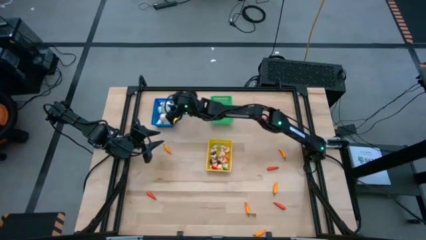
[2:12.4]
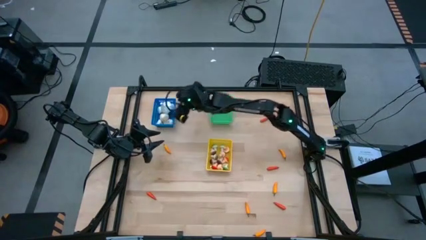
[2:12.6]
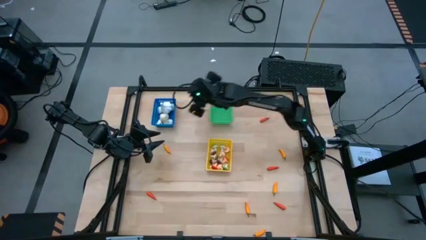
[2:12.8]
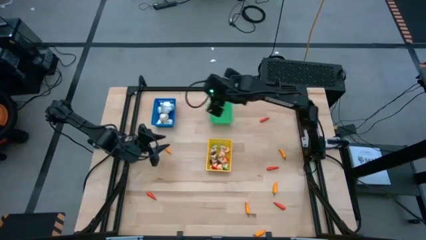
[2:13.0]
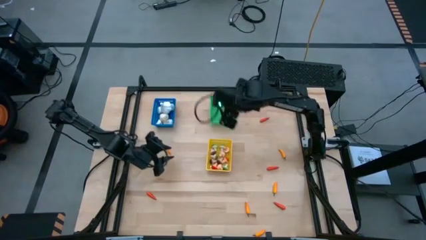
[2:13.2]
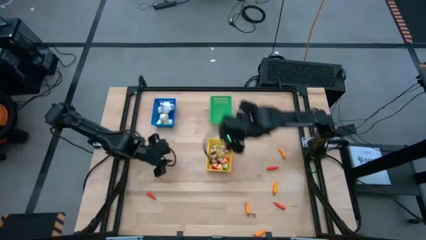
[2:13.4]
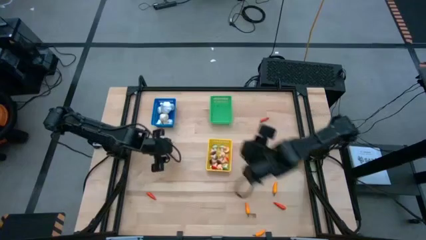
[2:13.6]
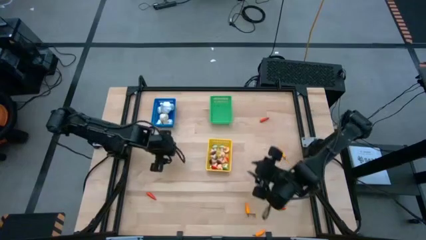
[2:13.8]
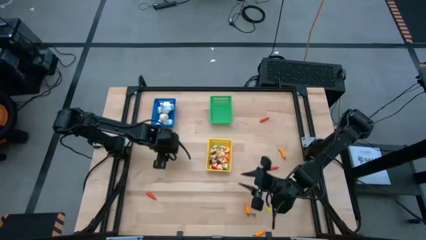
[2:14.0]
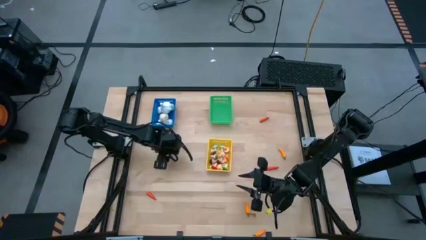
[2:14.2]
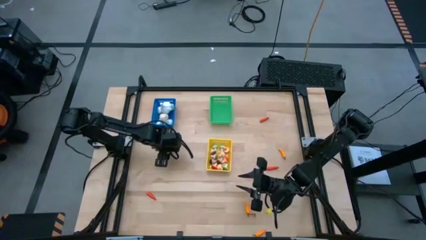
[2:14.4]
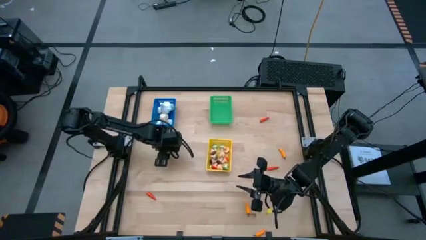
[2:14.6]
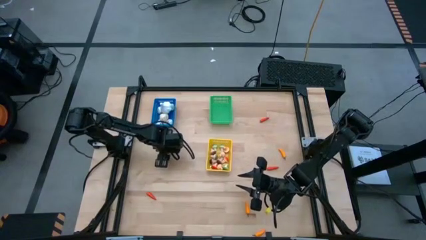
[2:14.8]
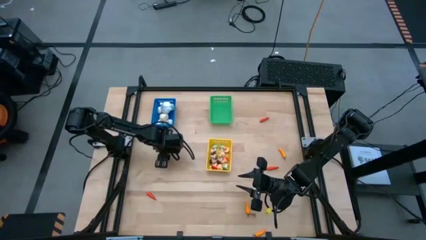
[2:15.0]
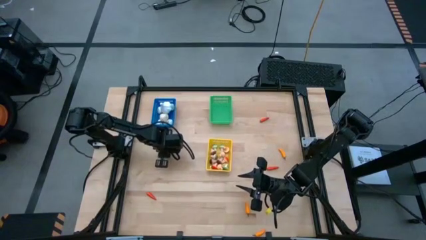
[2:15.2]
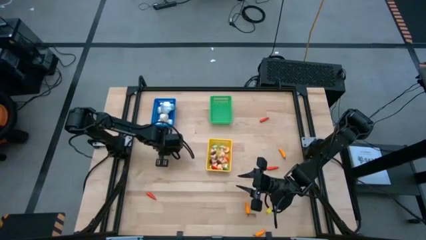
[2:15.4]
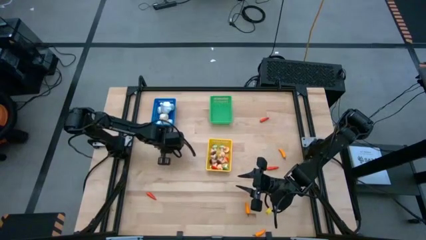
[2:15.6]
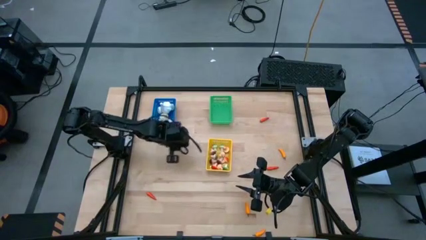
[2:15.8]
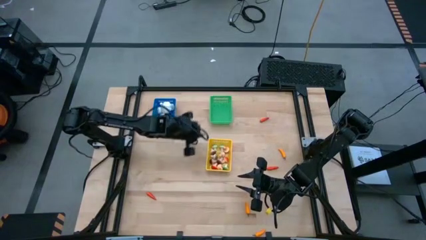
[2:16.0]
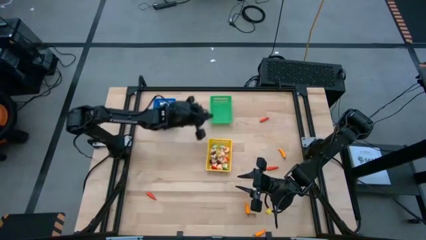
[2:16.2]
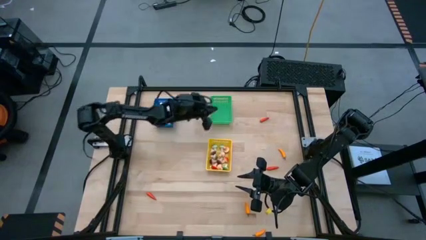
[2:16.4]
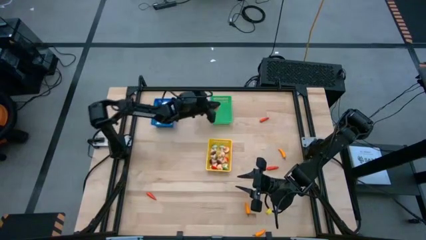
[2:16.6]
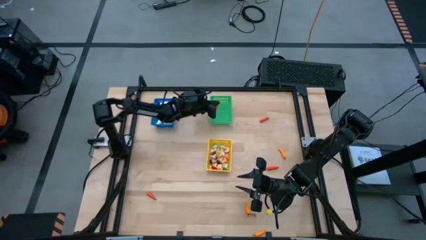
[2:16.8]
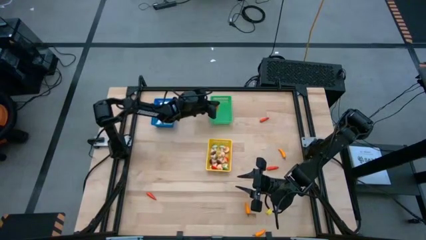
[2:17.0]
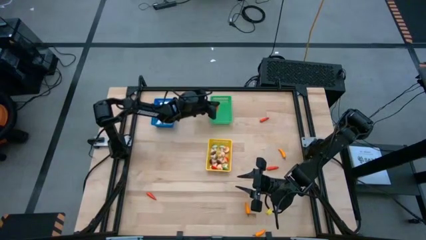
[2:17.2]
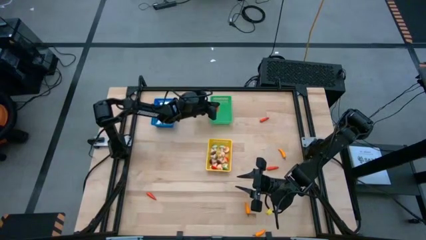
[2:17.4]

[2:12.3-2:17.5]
Task: Sort produce into baskets
Put the orange chili pepper into the green bin

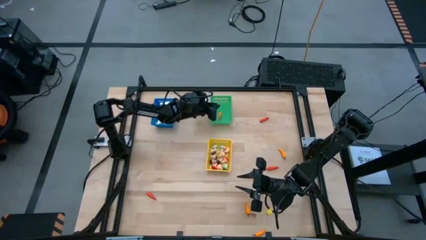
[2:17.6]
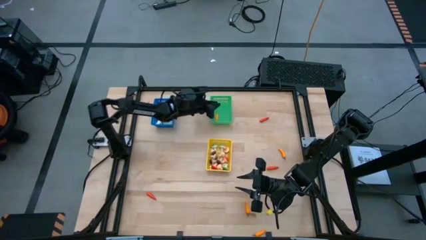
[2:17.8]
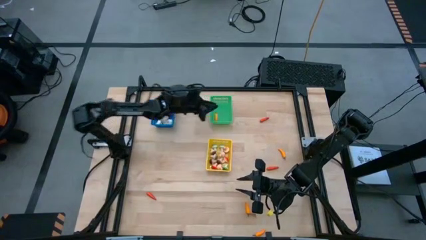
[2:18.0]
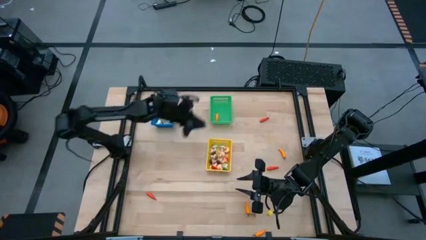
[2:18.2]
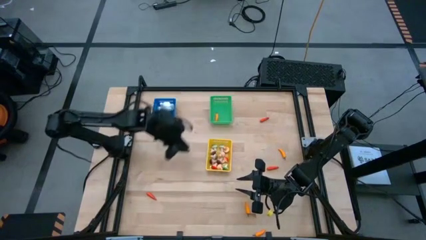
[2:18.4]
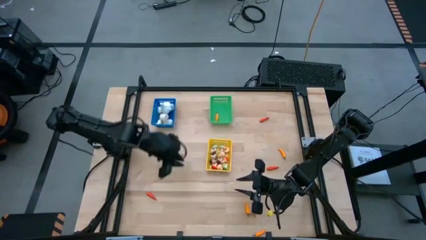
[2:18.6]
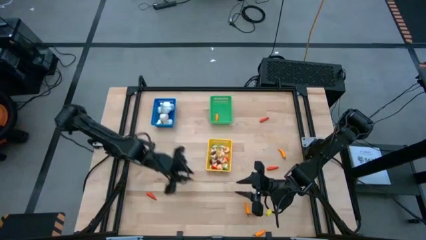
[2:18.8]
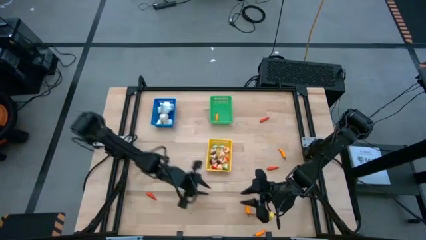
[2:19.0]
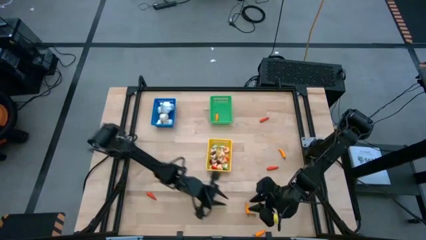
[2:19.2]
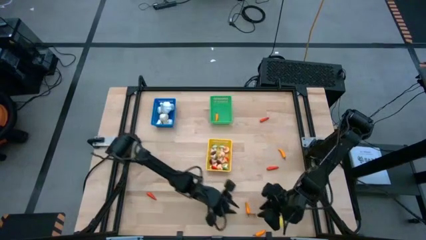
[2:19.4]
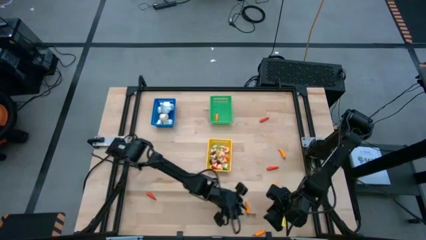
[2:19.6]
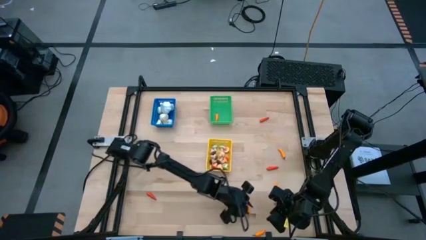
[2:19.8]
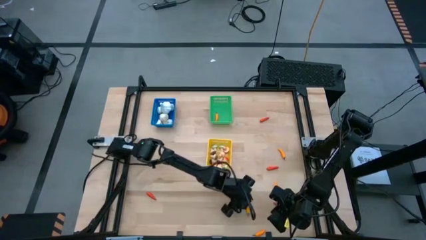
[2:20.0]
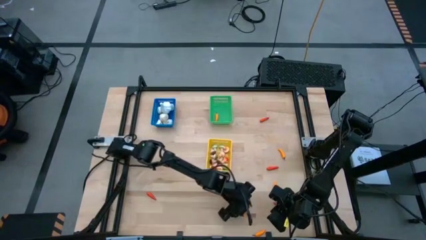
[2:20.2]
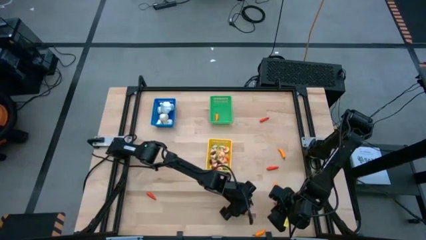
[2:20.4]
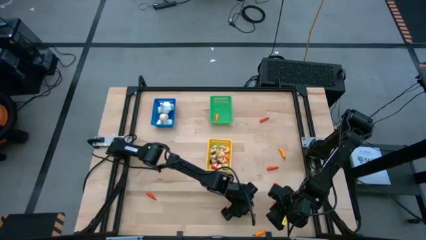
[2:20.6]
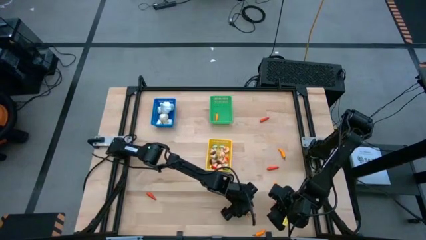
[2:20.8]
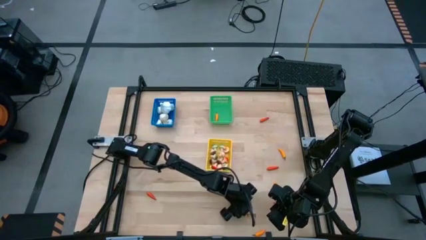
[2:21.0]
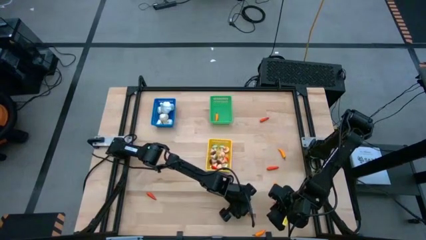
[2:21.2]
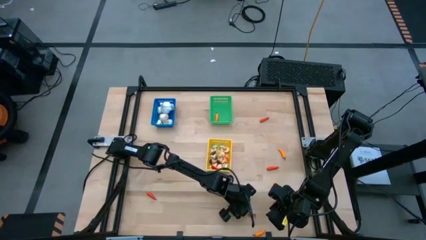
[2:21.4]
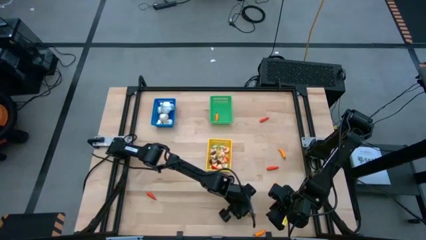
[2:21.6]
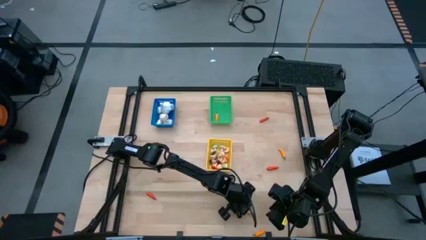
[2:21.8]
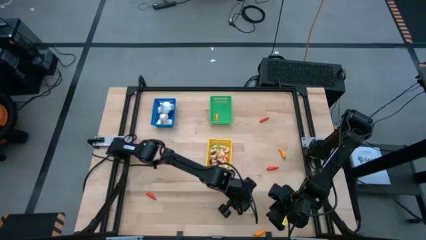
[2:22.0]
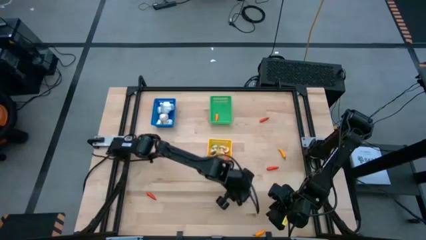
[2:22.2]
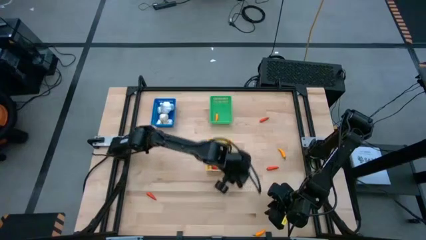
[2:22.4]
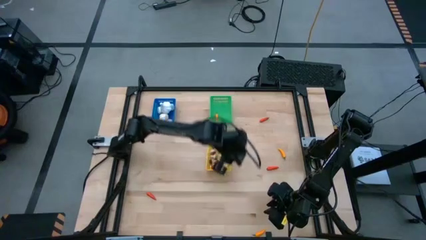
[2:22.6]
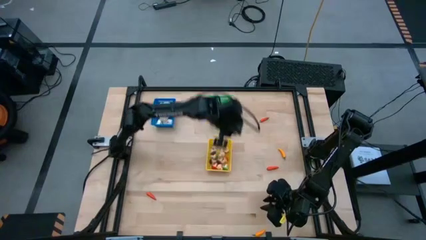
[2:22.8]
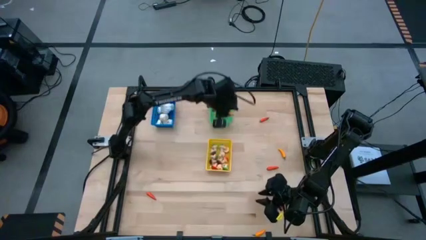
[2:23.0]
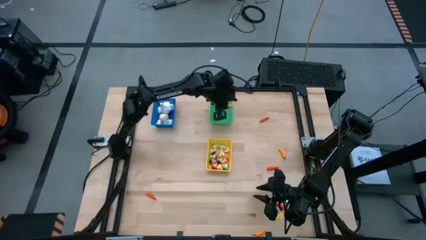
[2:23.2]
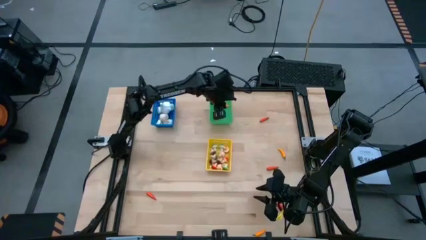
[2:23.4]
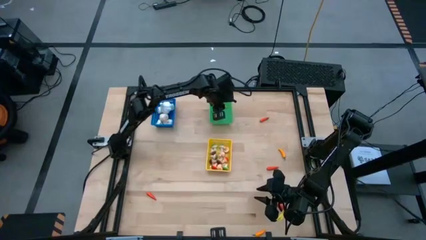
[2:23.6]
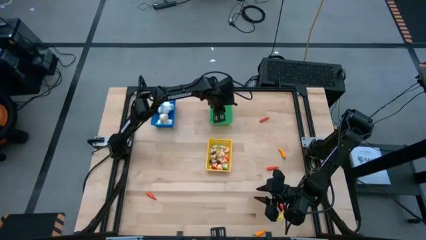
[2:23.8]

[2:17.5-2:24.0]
Put the orange chili pepper into the green bin

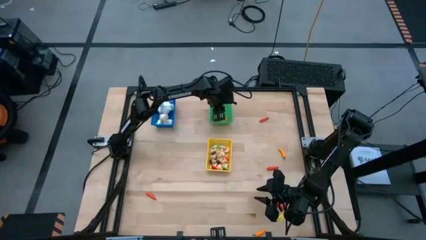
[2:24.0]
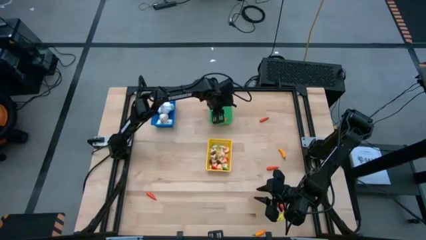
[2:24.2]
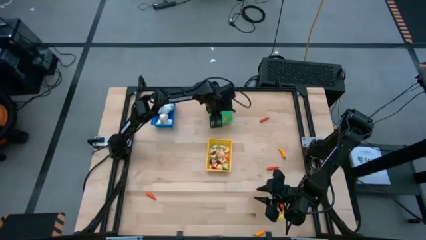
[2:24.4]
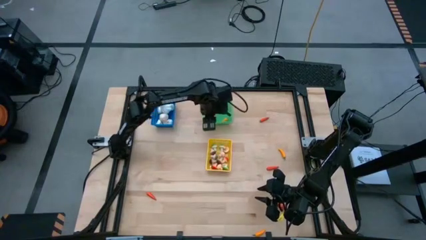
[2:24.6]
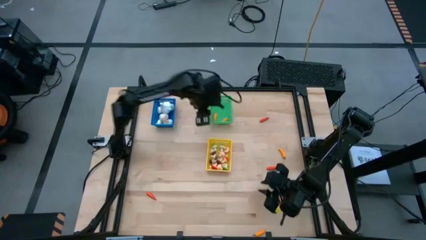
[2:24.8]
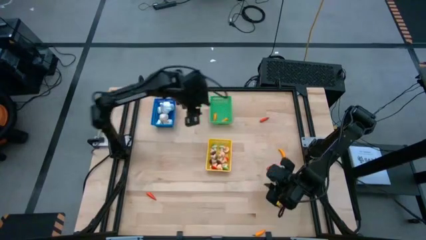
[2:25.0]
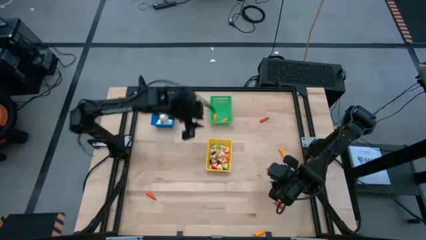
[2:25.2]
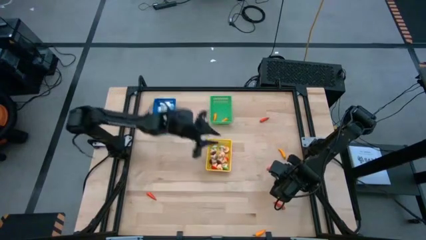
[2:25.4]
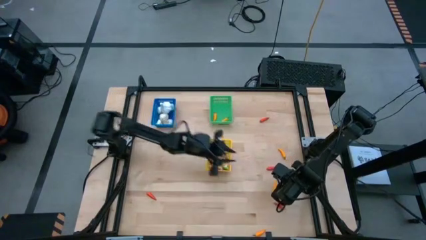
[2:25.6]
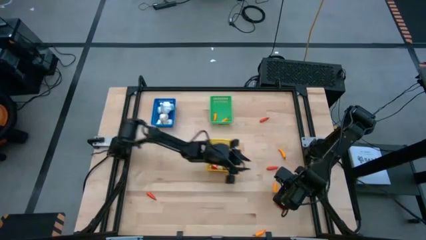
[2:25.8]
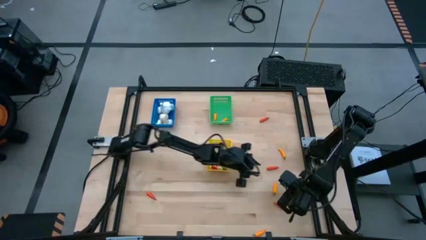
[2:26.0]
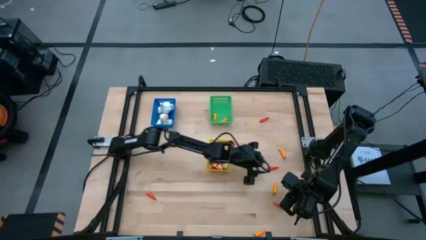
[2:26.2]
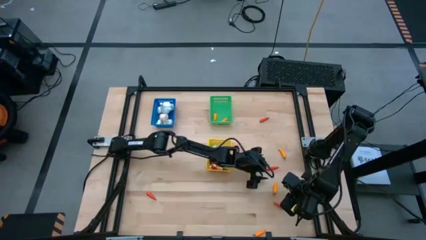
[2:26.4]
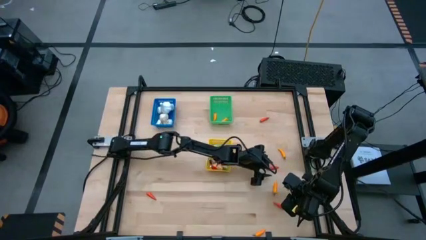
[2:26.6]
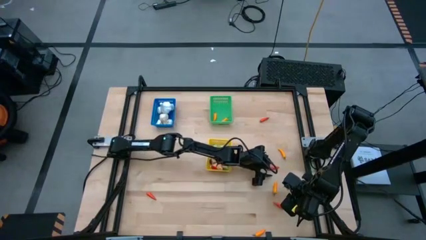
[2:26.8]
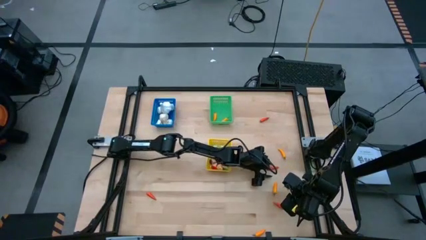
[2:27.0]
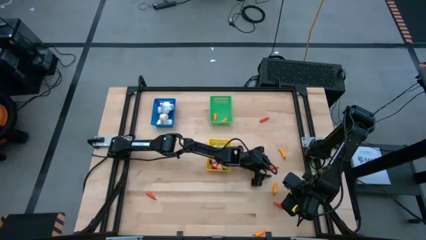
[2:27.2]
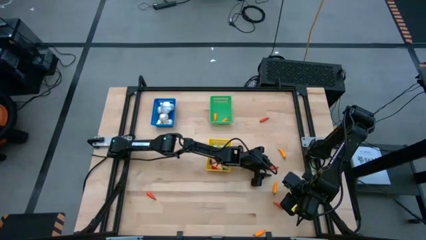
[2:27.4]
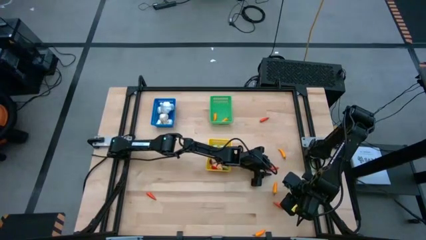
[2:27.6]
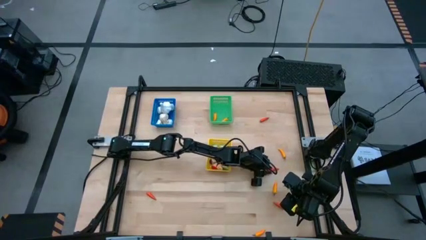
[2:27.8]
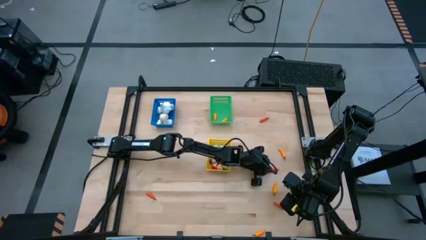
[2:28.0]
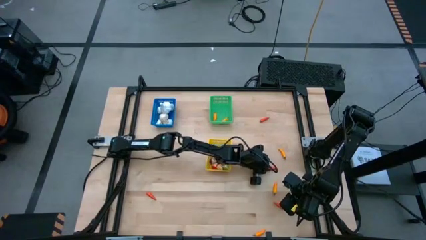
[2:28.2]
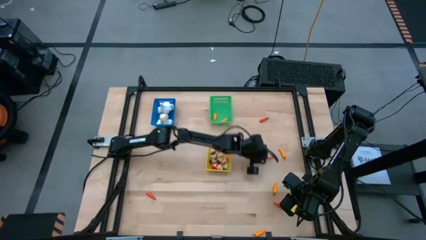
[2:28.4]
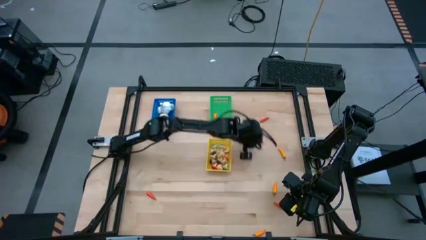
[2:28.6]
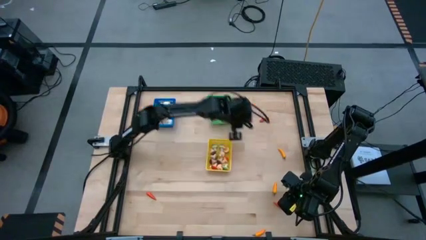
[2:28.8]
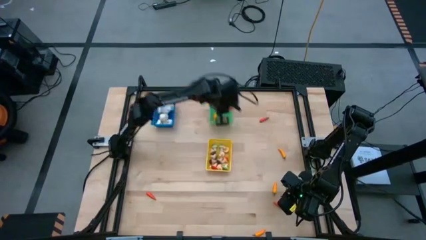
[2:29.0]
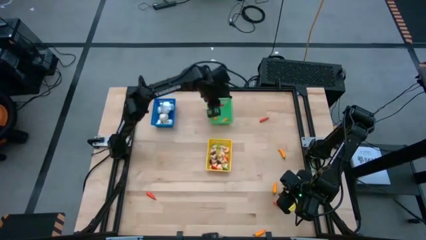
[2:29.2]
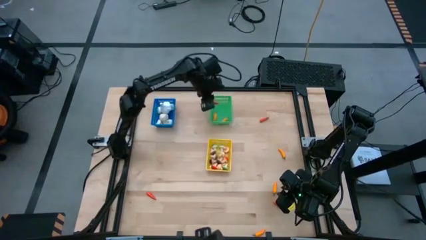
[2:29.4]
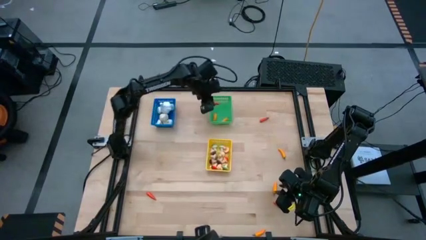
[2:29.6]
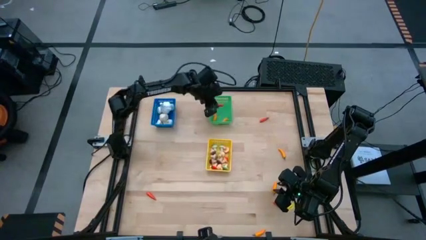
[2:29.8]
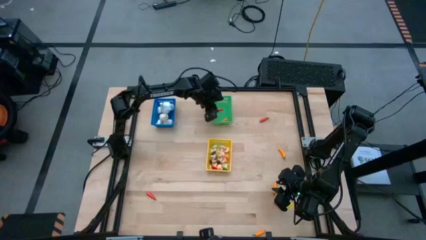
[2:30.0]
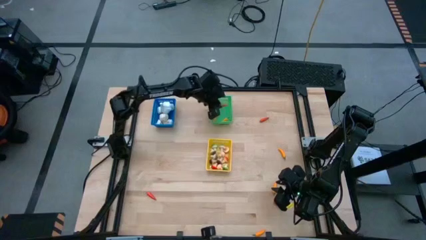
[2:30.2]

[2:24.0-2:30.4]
Put the red chili pepper into the green bin
